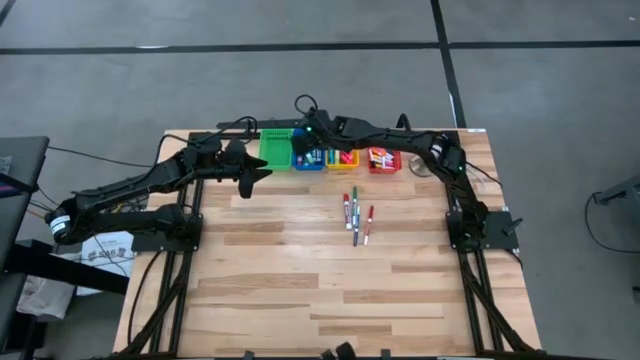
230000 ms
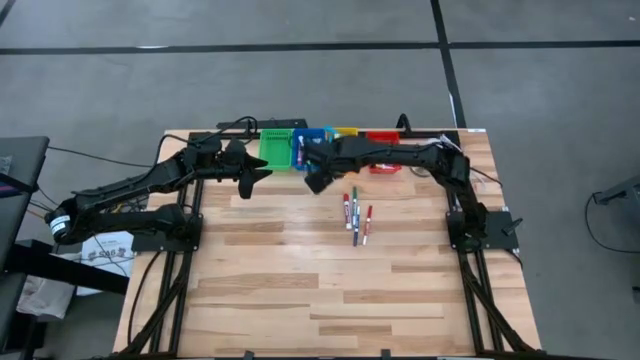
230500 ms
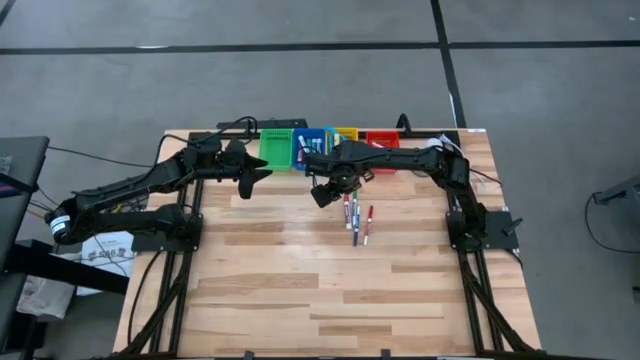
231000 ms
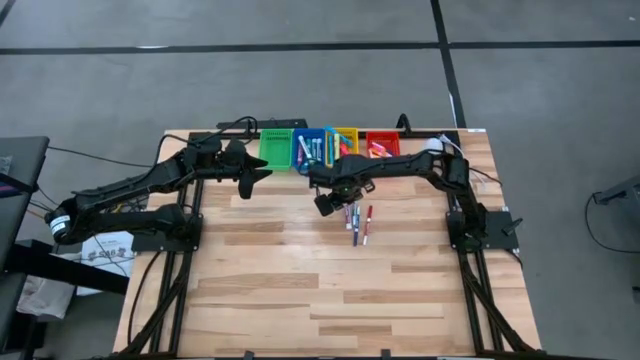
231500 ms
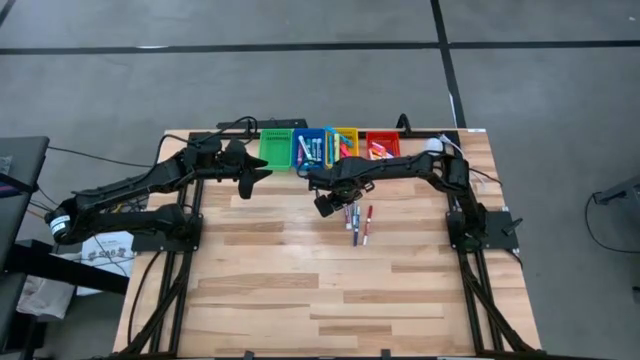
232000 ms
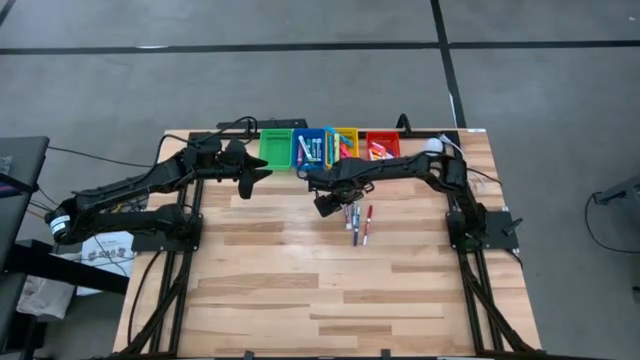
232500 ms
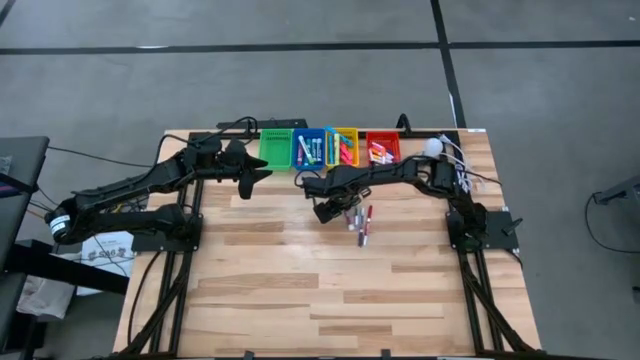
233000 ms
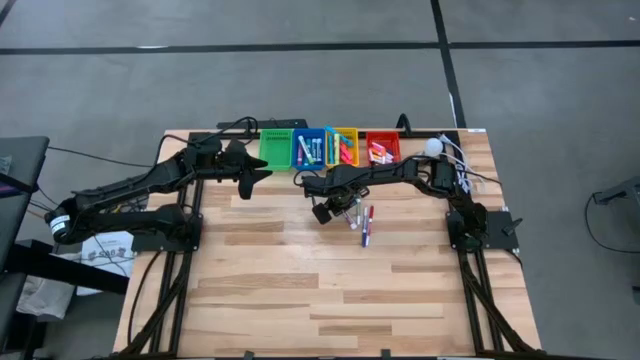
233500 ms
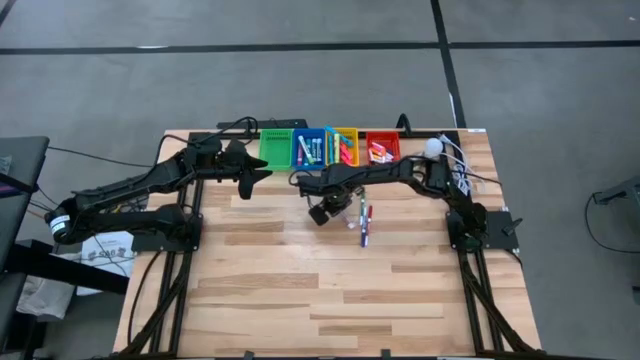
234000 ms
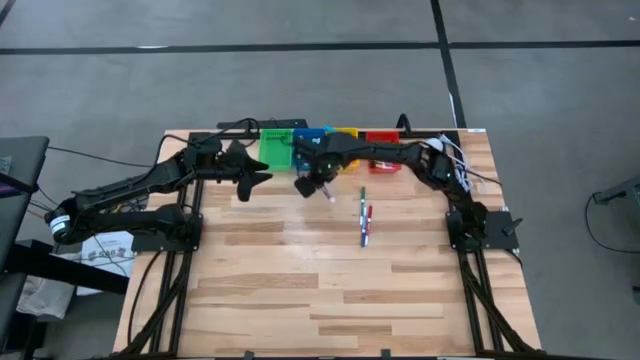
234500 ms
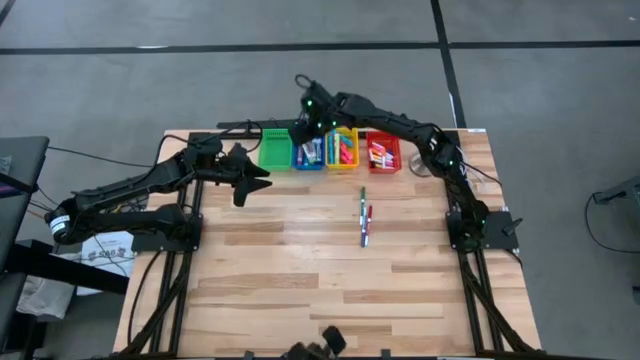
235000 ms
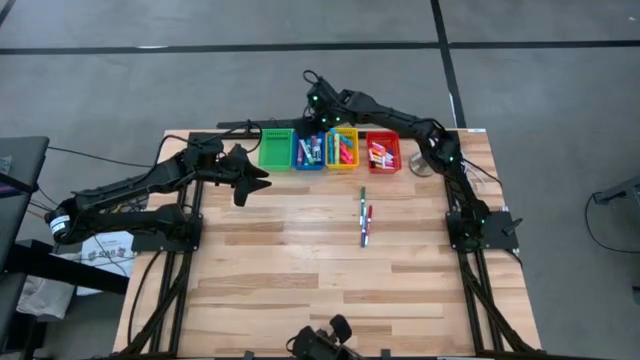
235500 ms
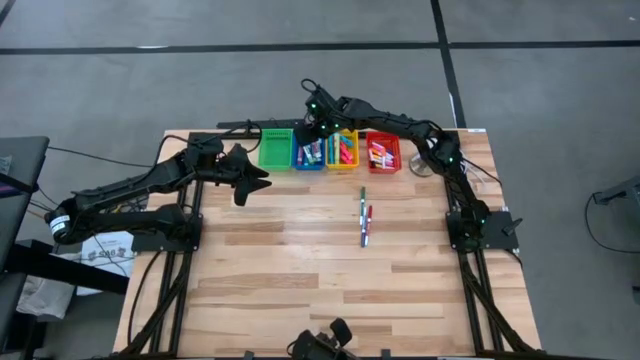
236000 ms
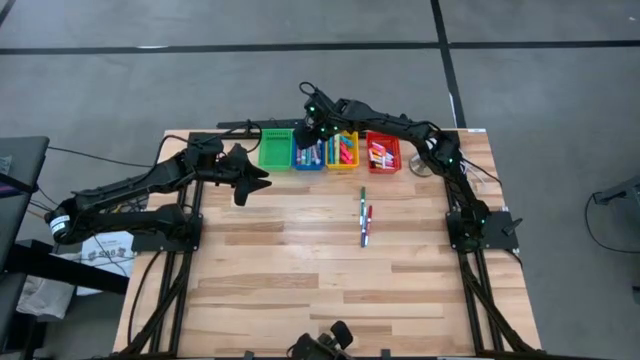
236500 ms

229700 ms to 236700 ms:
Task: Pick & Place Markers
Put the red dry erase marker into the blue basket

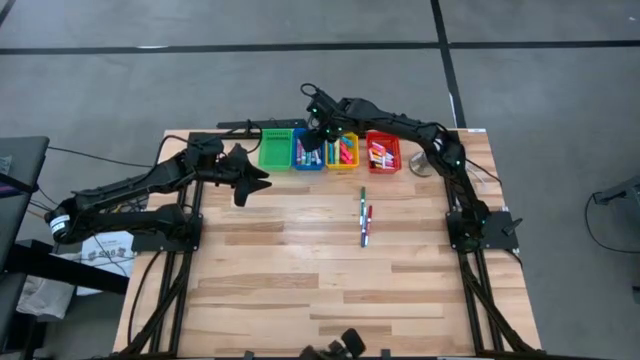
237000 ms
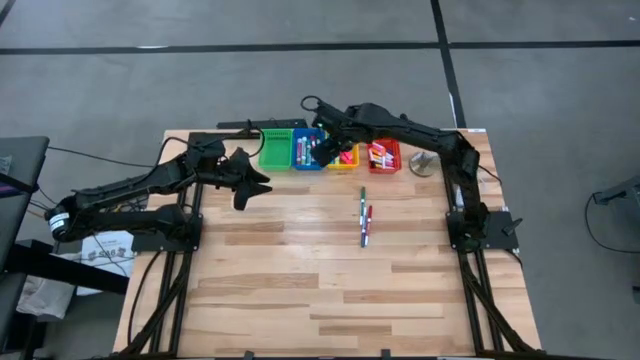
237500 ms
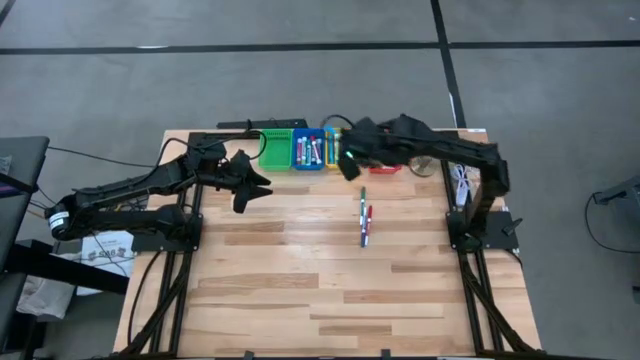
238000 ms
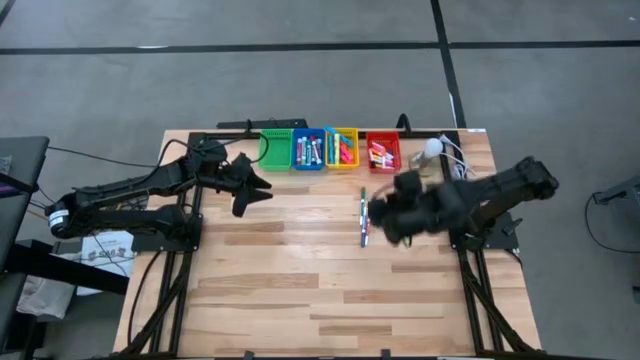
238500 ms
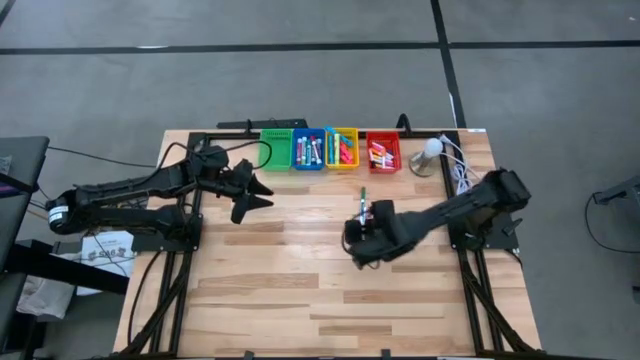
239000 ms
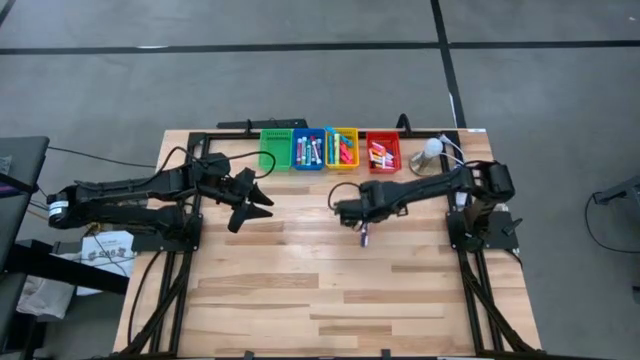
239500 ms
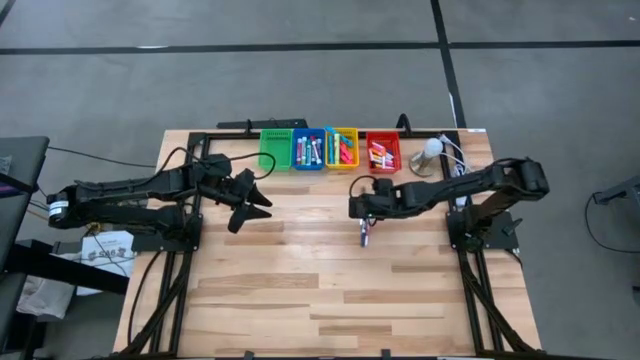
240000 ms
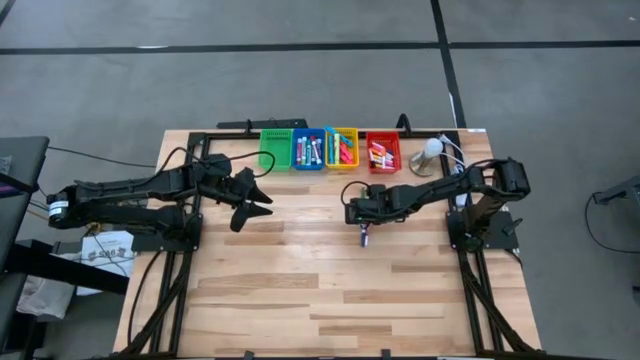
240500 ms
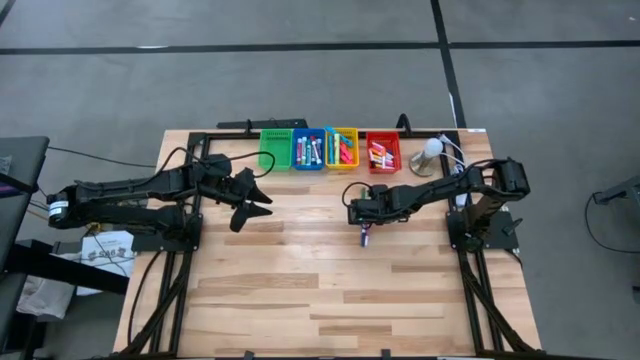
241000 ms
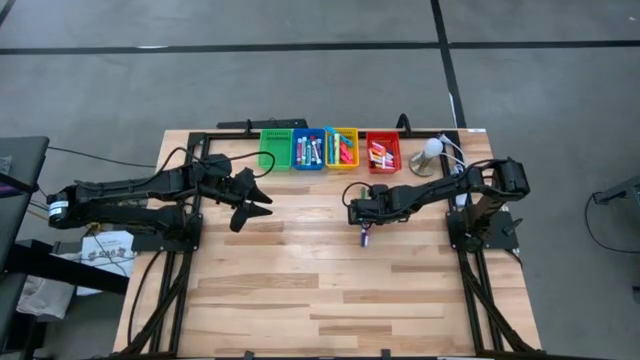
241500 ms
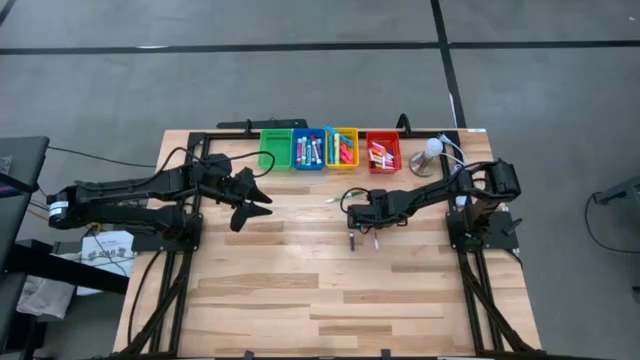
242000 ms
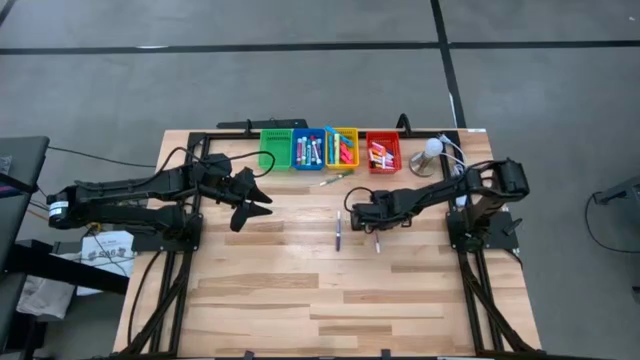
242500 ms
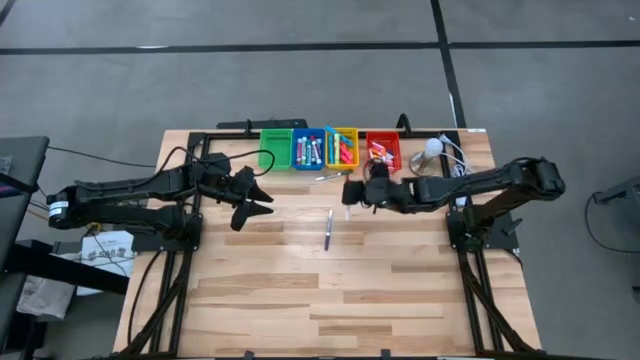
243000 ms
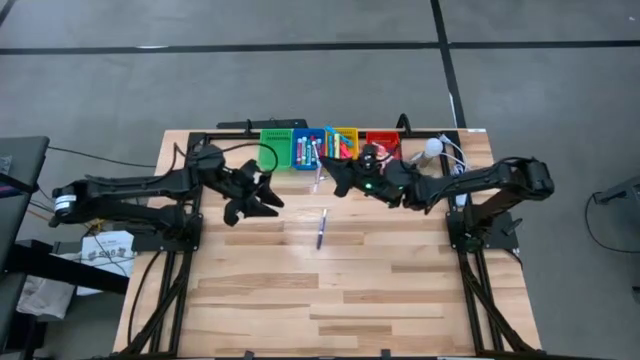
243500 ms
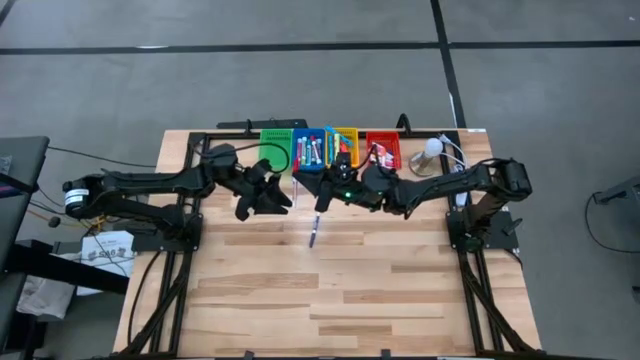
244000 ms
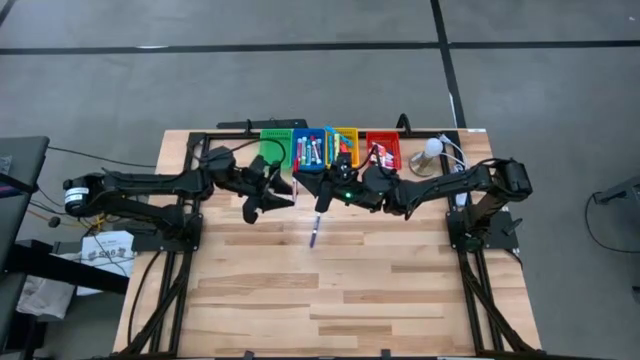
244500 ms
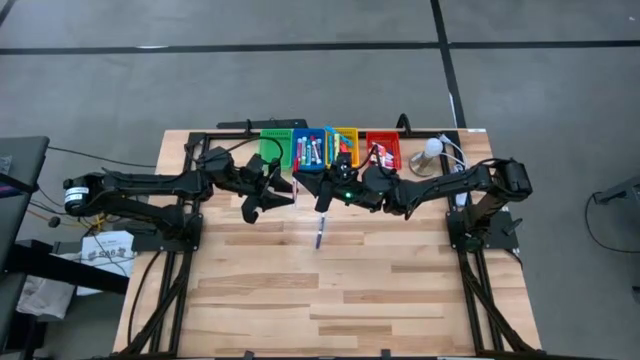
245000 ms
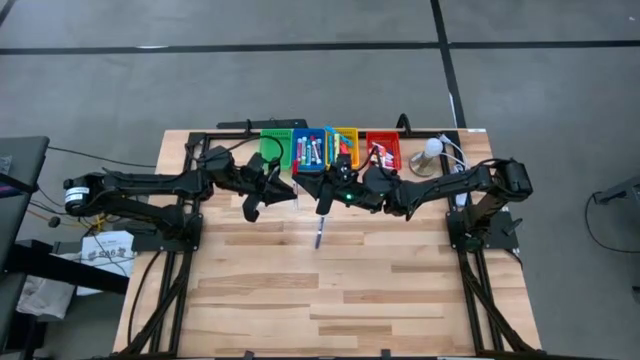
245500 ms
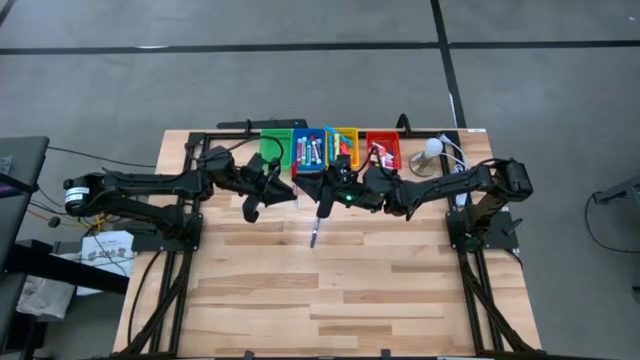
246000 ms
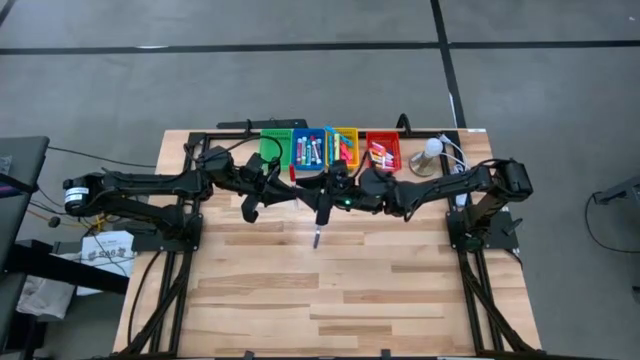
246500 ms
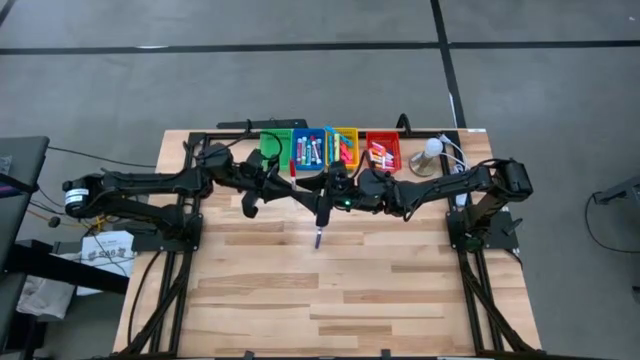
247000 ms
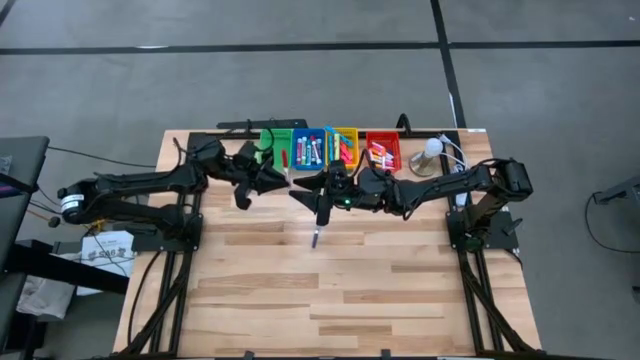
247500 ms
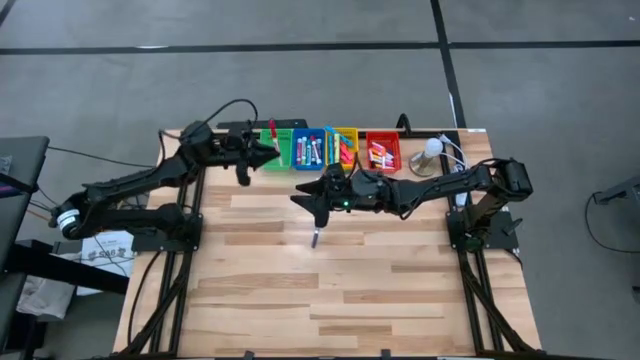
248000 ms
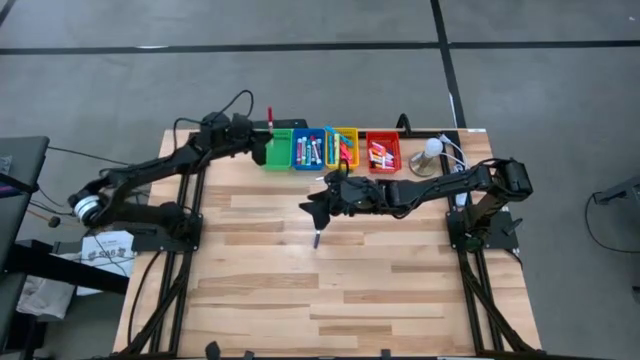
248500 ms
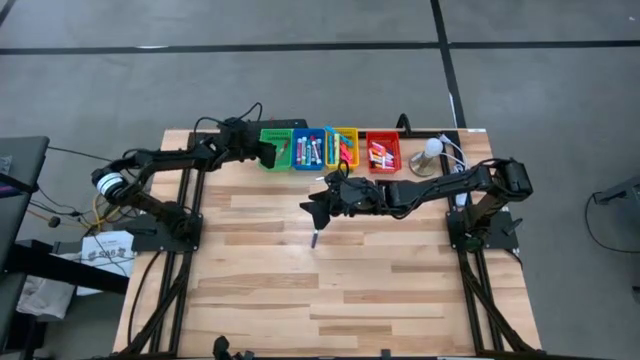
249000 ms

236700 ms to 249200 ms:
Put the red dry erase marker into the green basket

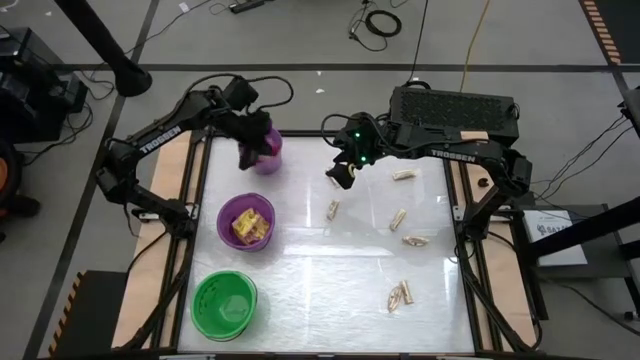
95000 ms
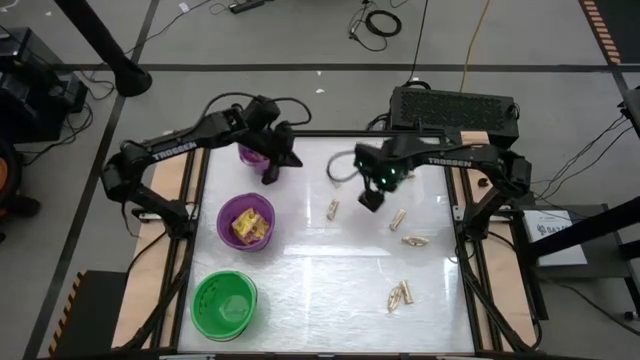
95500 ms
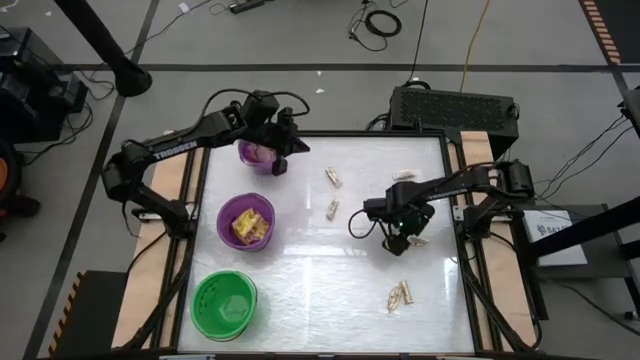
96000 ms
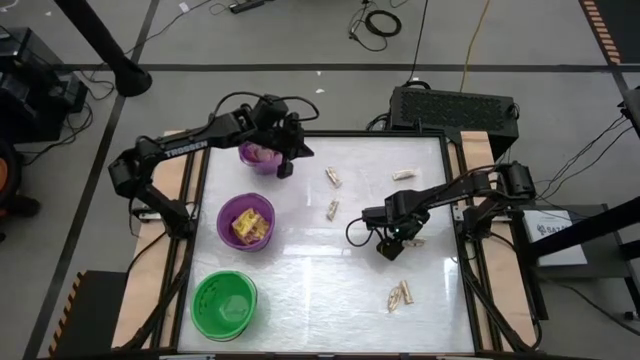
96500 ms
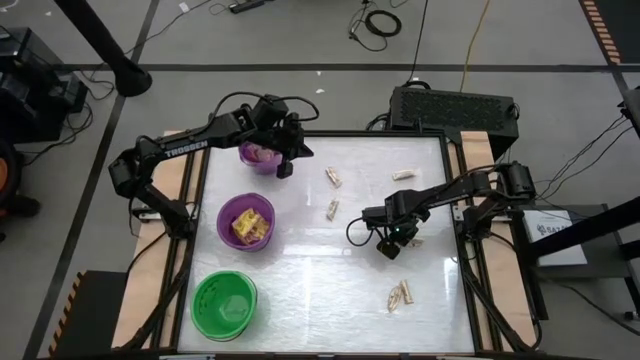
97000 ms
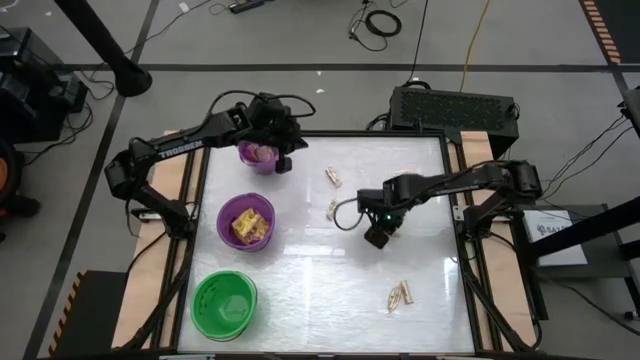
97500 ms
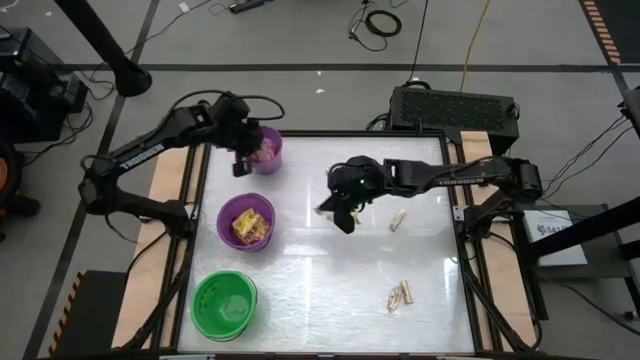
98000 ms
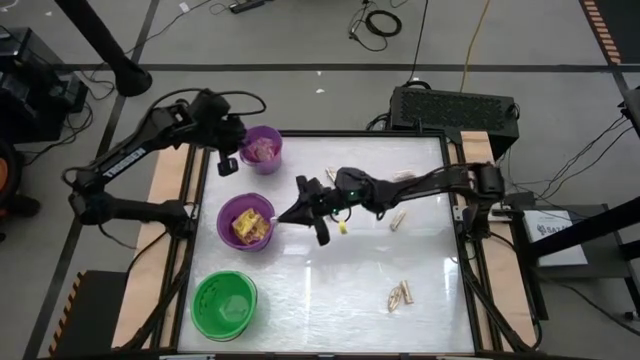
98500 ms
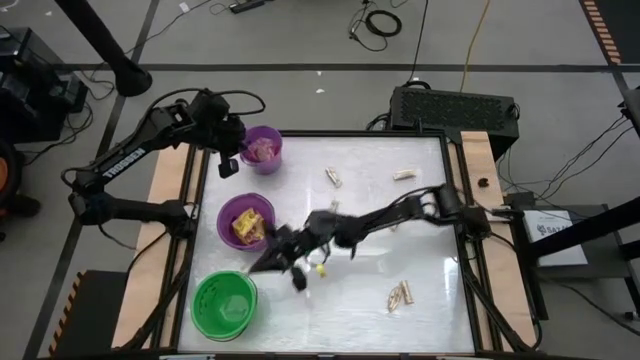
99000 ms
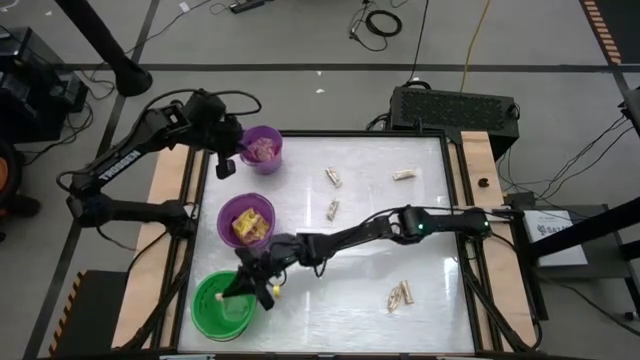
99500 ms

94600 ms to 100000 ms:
Task: Sort candy by brand, put in halloween buckets
Put the white candy into the green bucket
